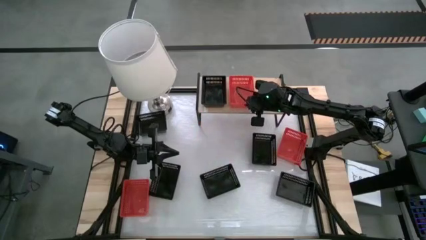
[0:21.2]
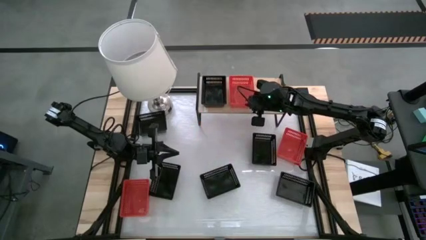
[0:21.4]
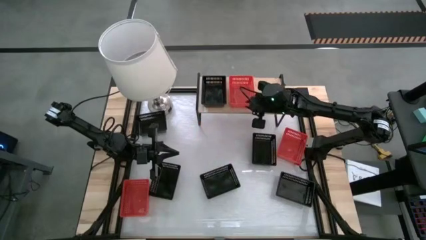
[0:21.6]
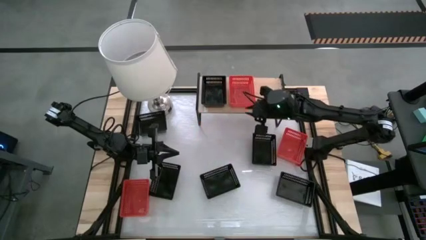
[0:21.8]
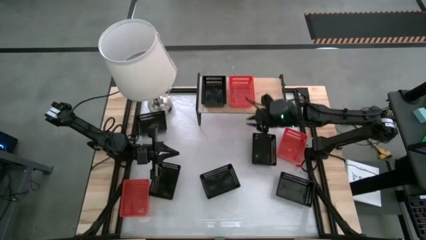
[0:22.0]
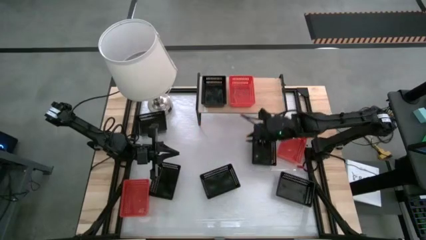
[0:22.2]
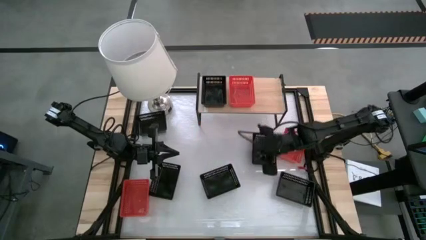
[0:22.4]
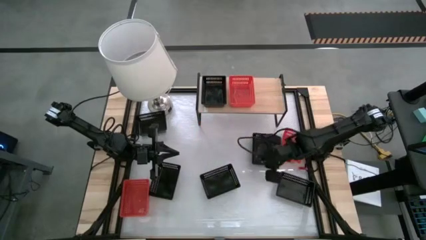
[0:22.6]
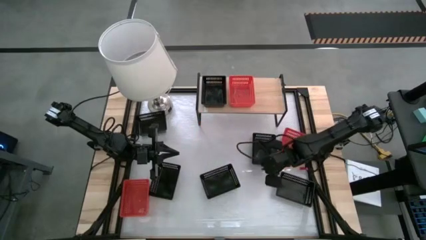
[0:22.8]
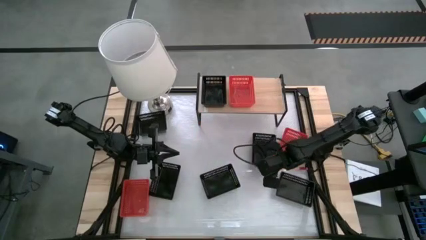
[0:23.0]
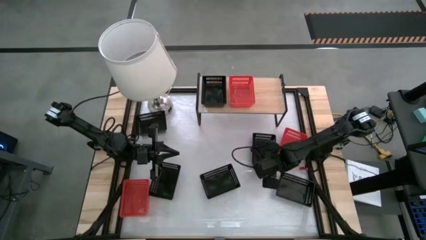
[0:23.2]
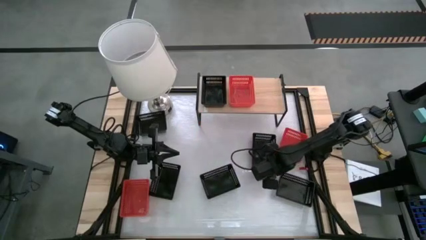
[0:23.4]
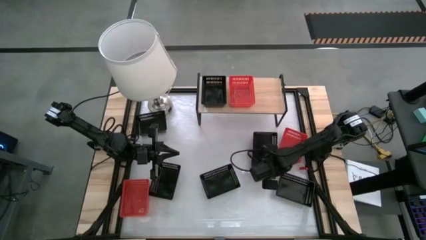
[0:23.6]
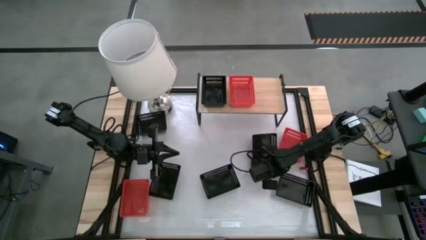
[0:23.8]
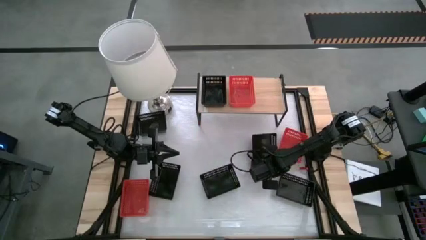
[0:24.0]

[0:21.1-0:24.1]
Task: Stack baskets on shelf by color
Put the black bin on the shelf

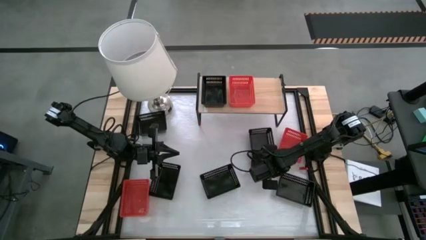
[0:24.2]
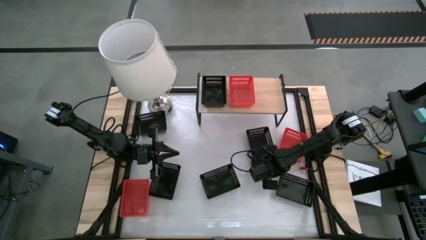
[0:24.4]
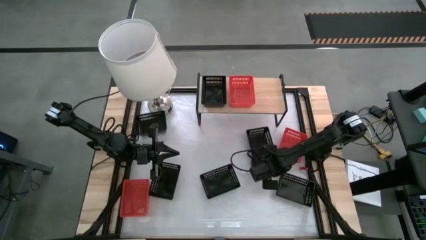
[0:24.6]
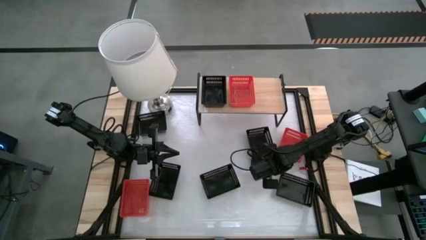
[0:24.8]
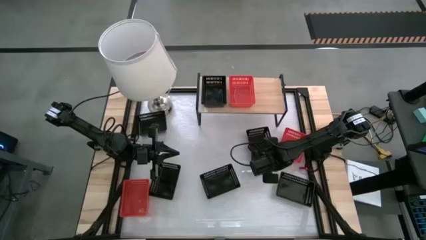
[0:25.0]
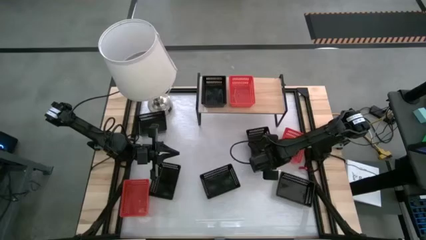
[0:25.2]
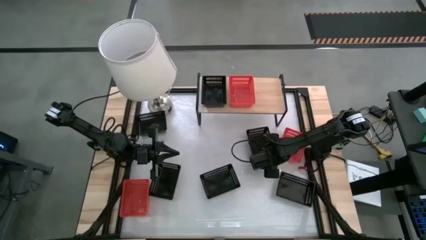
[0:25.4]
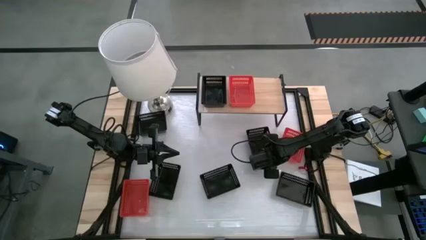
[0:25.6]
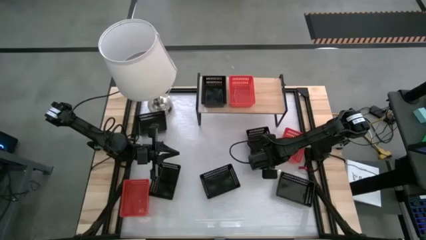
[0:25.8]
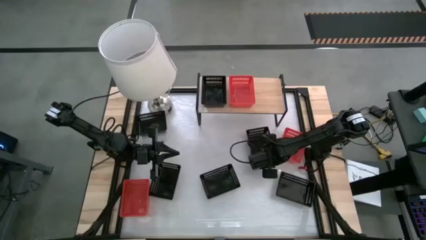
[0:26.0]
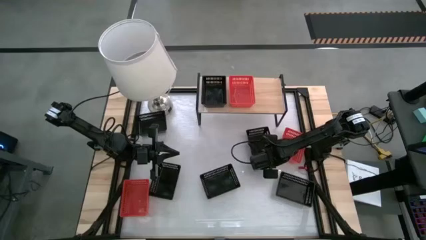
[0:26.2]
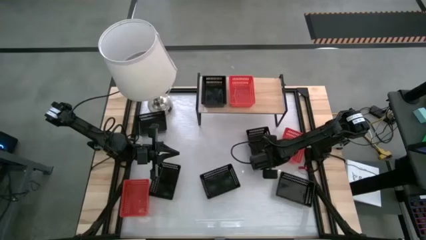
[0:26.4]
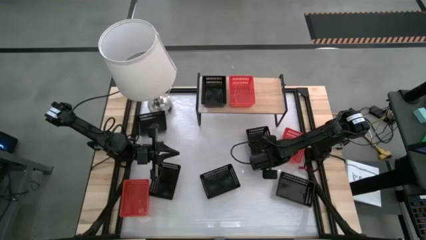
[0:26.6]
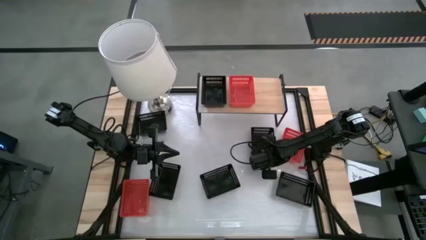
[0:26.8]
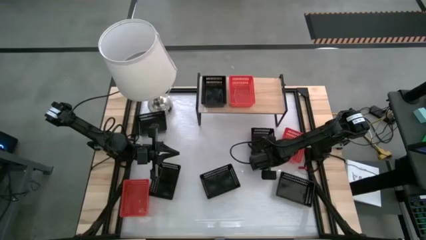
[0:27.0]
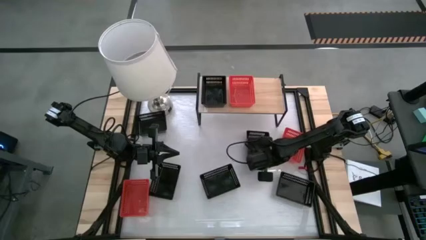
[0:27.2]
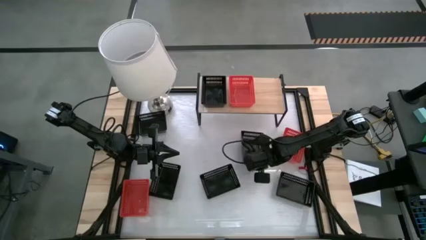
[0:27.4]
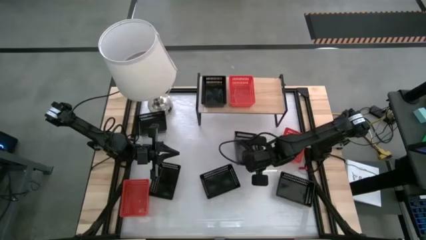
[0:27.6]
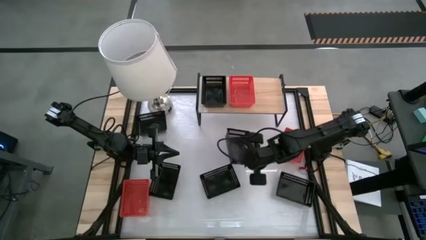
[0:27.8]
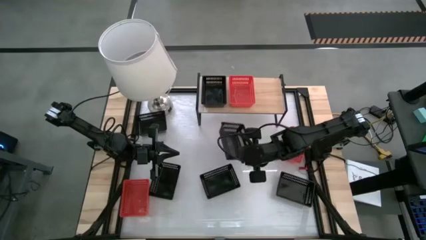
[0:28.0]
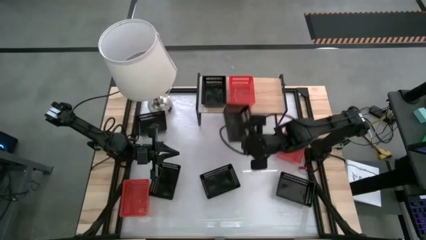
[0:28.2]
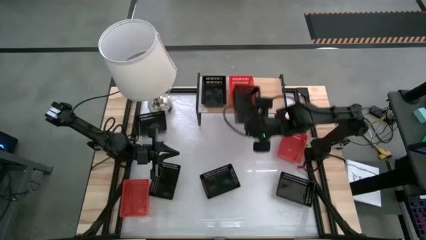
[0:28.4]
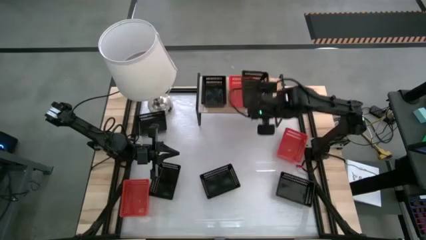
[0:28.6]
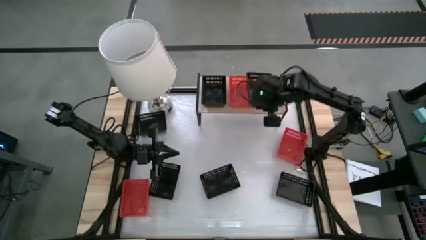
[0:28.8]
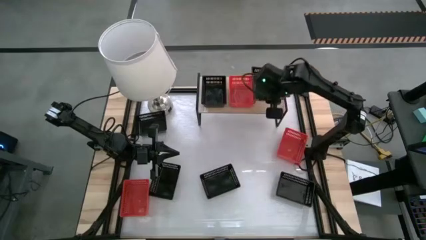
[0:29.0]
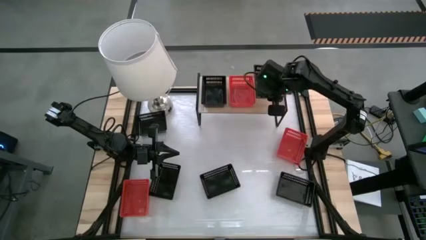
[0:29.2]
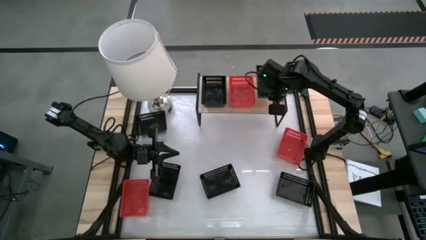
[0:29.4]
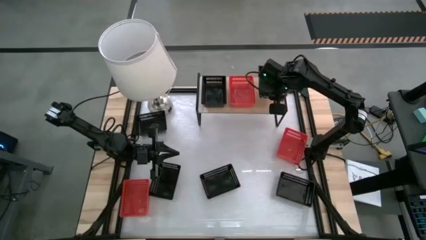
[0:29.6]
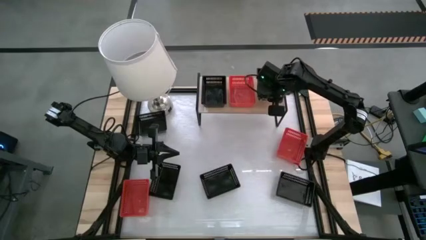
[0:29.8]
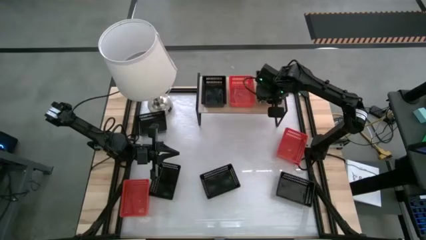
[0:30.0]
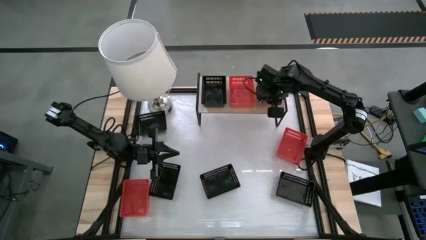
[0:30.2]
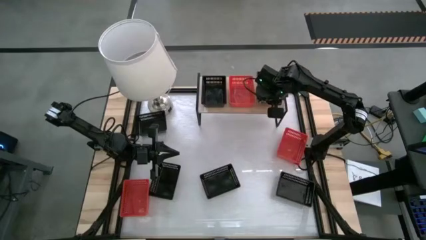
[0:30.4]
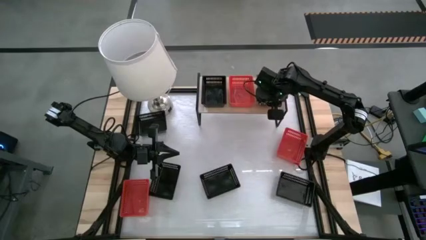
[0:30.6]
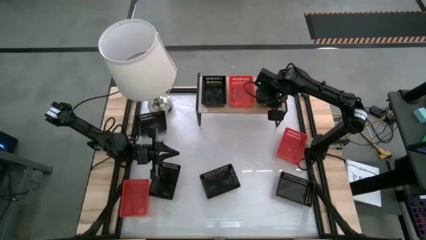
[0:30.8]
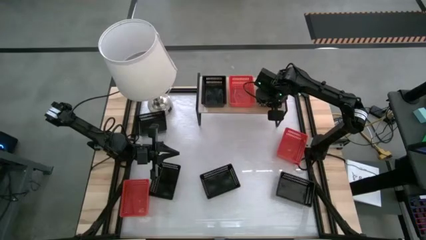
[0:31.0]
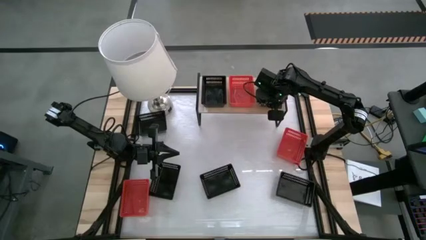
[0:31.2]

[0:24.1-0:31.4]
Put the black bin on the shelf

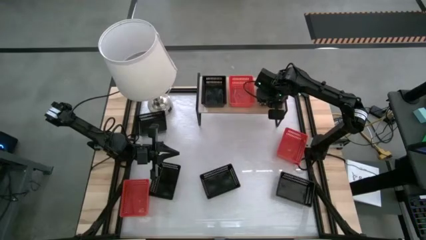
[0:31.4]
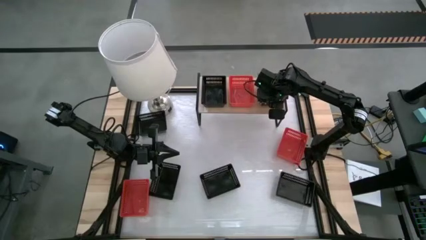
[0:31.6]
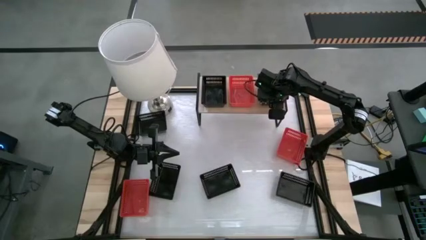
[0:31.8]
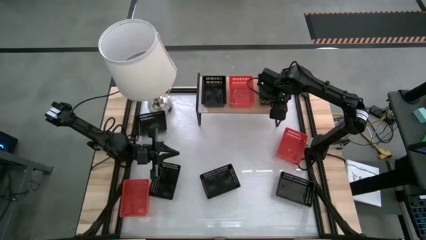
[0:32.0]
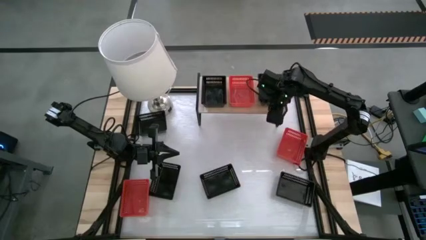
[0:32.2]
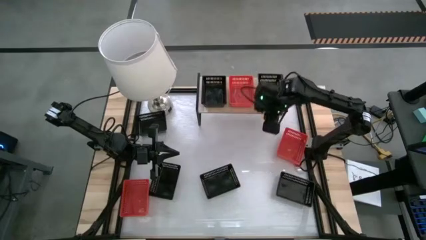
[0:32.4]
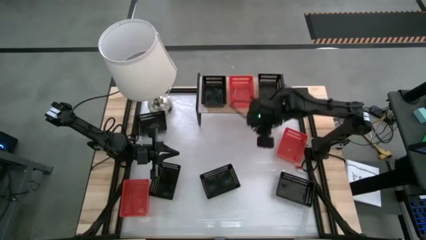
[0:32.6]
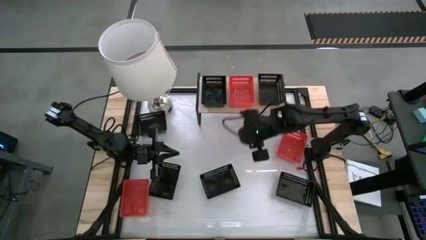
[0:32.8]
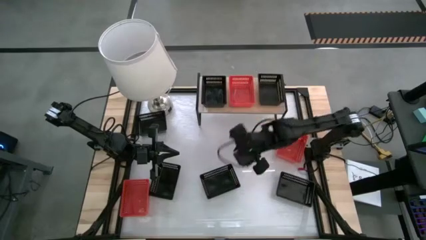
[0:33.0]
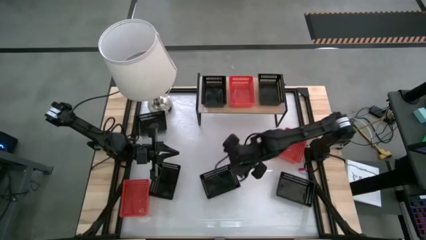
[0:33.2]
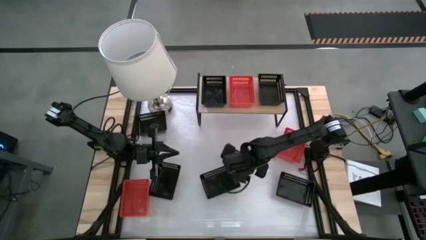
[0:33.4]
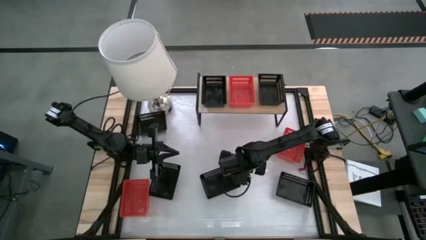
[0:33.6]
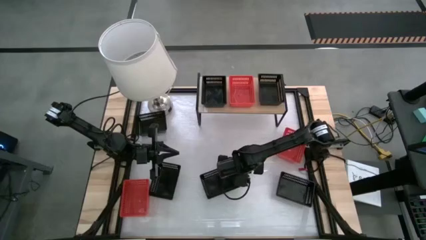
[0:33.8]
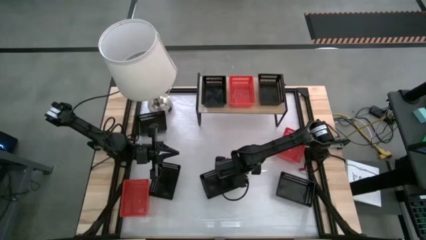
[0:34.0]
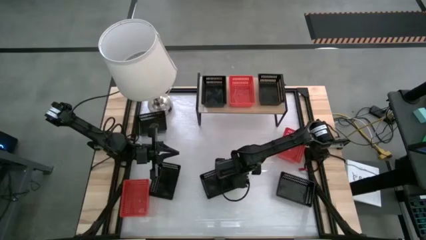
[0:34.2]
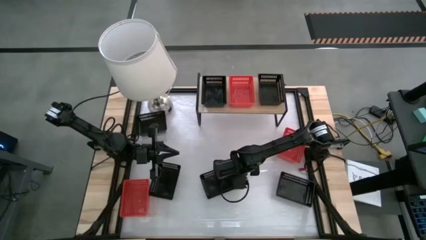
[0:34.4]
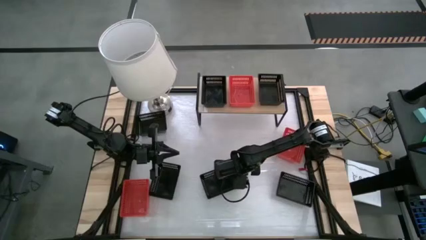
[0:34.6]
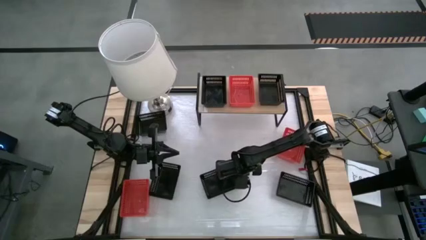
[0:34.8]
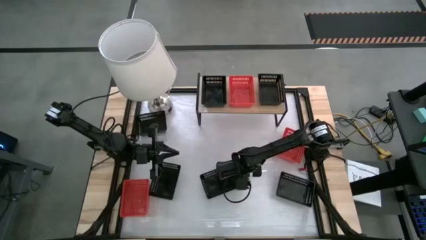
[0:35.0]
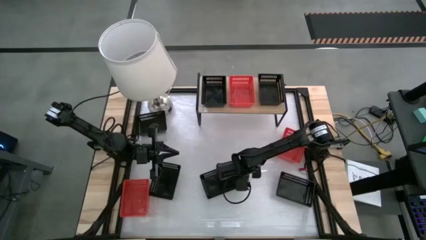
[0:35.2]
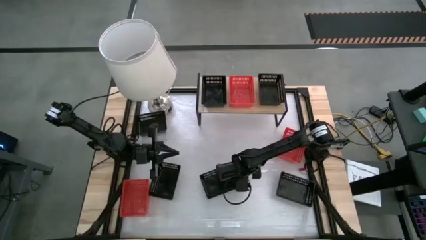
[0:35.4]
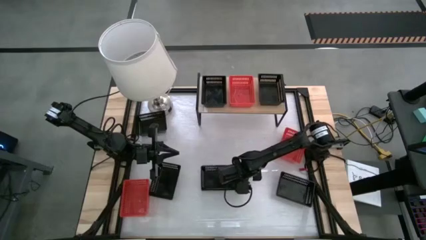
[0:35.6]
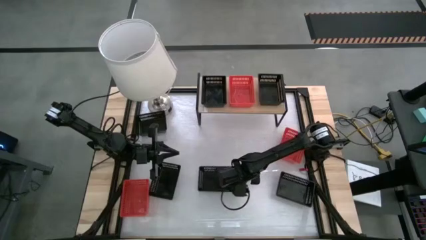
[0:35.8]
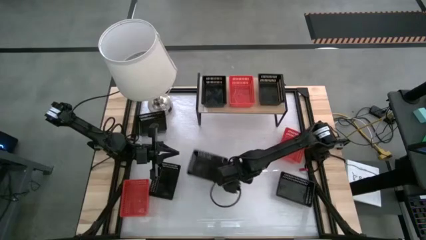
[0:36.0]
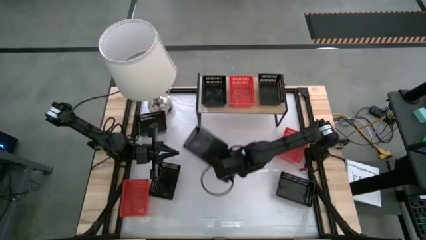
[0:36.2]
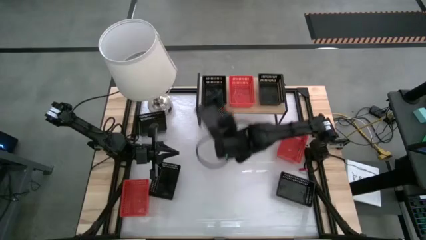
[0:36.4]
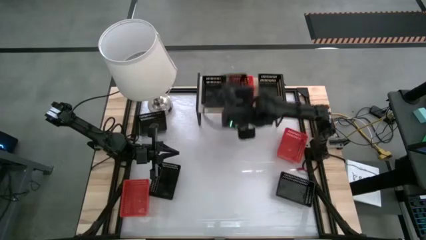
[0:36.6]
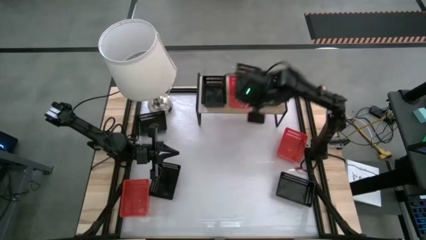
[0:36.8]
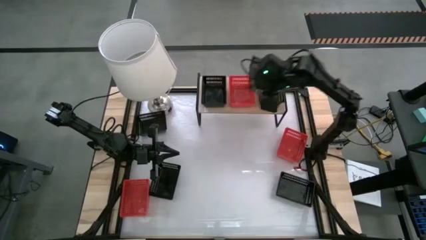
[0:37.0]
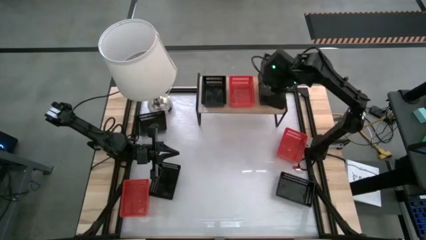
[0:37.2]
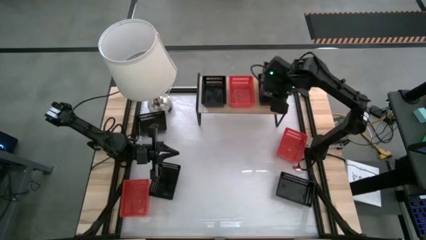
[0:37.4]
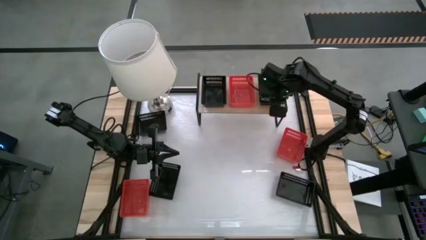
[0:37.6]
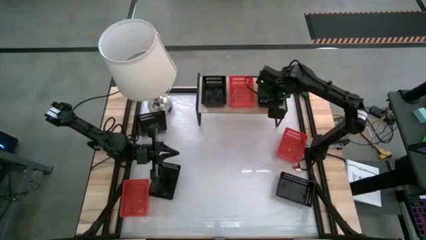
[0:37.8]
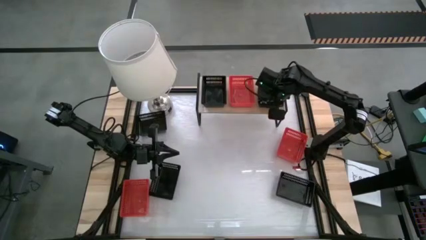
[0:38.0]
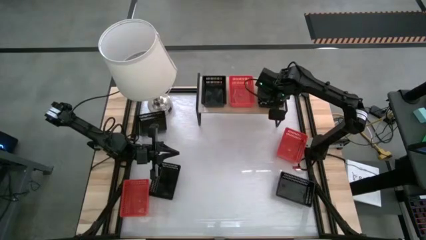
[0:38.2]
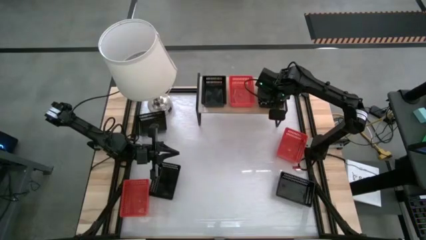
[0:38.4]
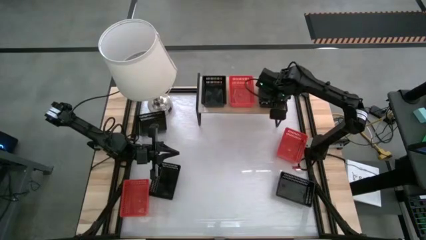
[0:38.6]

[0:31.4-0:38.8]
Stack the black bin on top of the other black bin on the shelf
